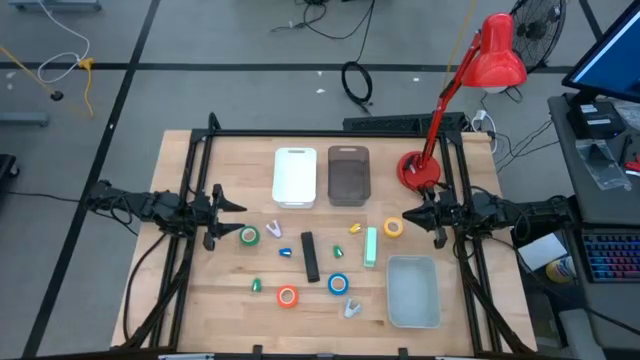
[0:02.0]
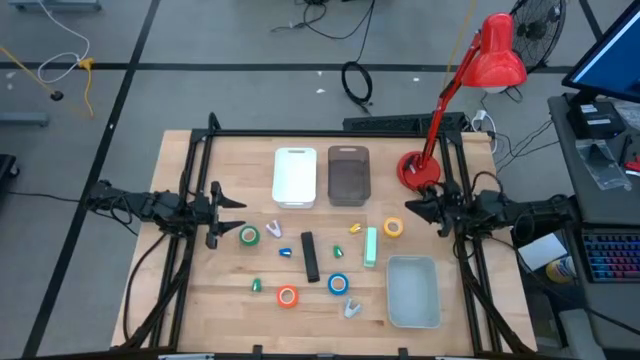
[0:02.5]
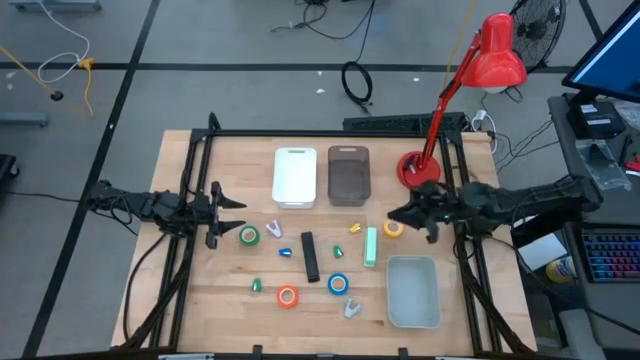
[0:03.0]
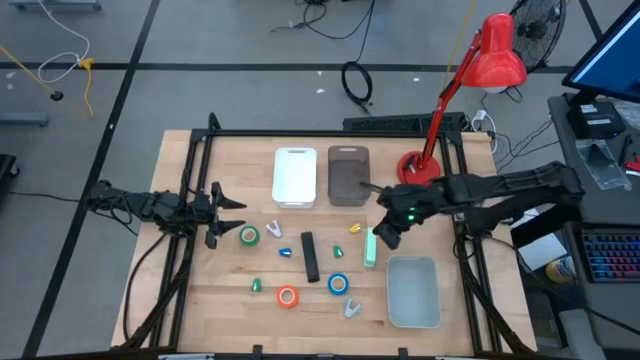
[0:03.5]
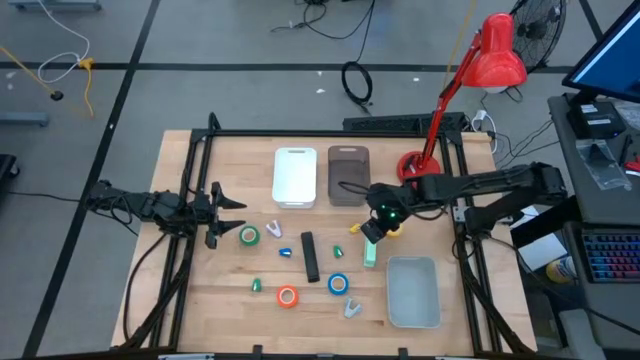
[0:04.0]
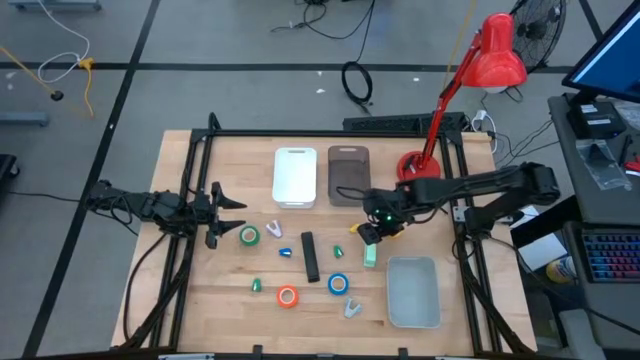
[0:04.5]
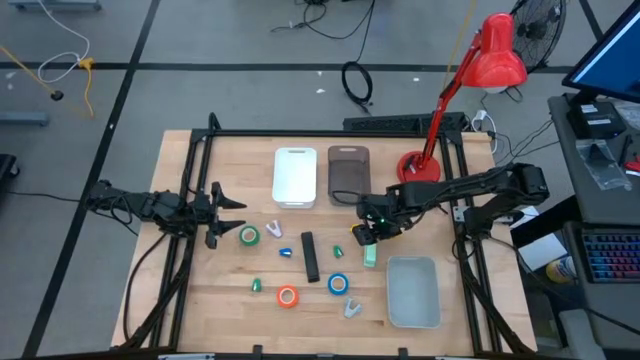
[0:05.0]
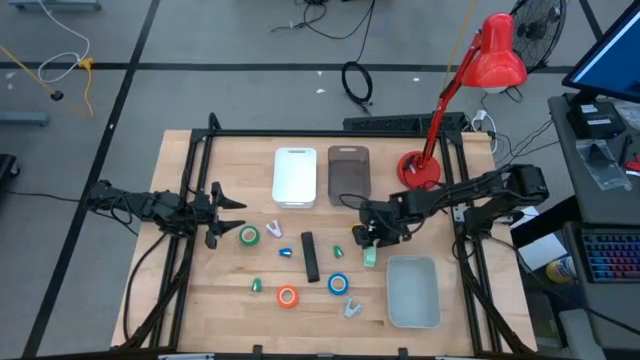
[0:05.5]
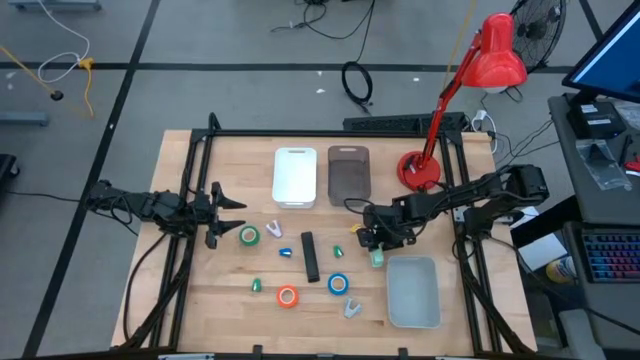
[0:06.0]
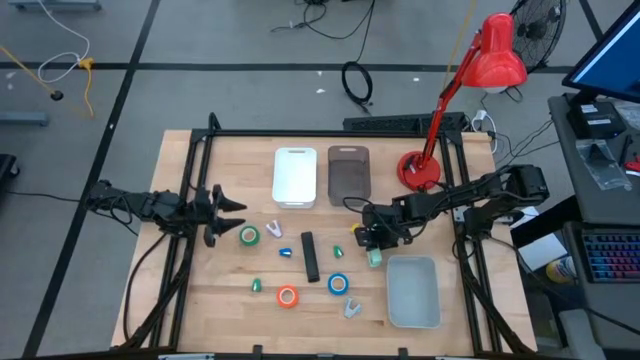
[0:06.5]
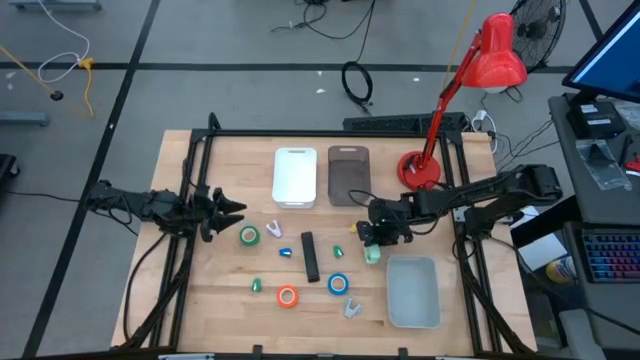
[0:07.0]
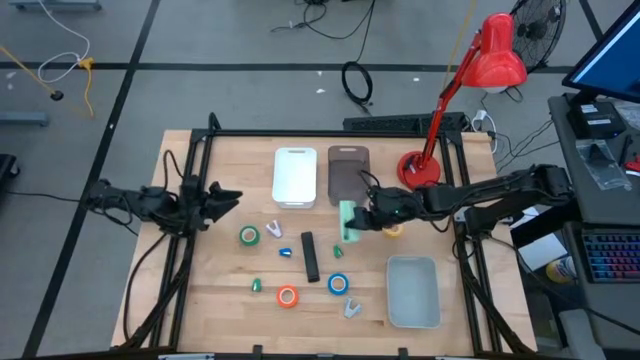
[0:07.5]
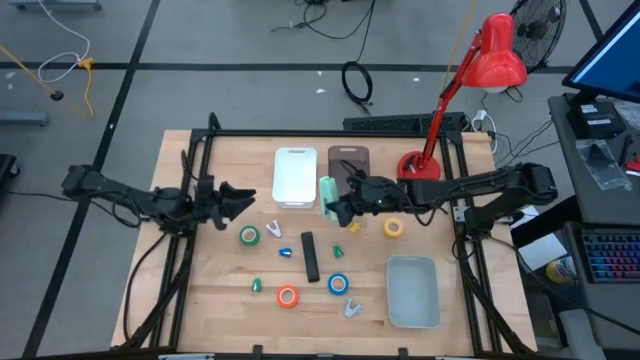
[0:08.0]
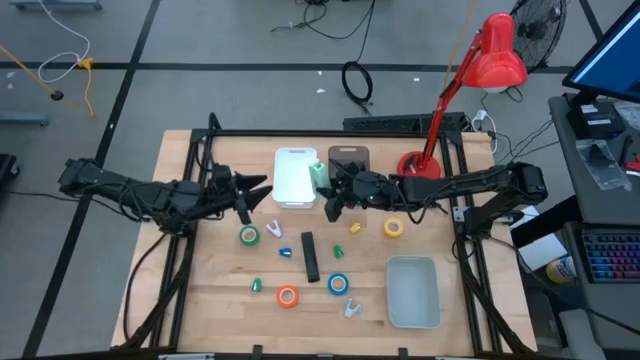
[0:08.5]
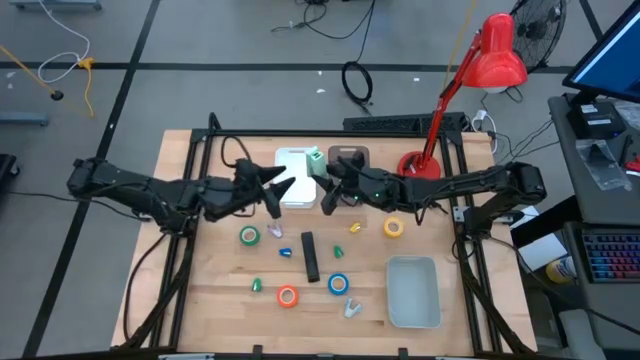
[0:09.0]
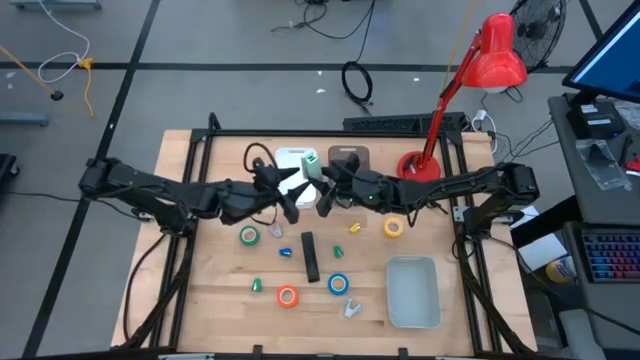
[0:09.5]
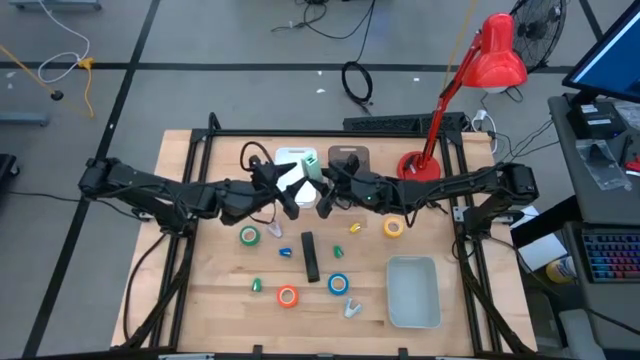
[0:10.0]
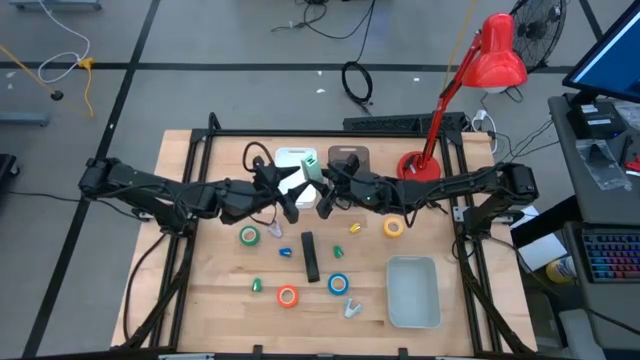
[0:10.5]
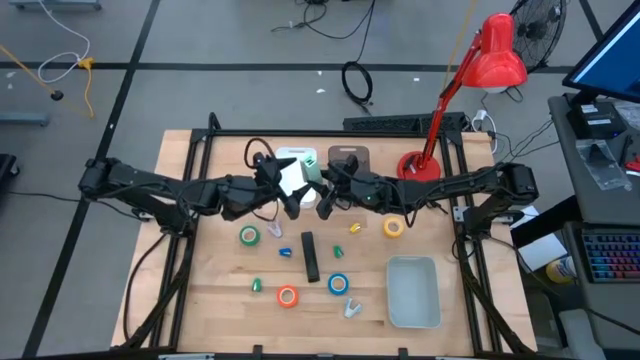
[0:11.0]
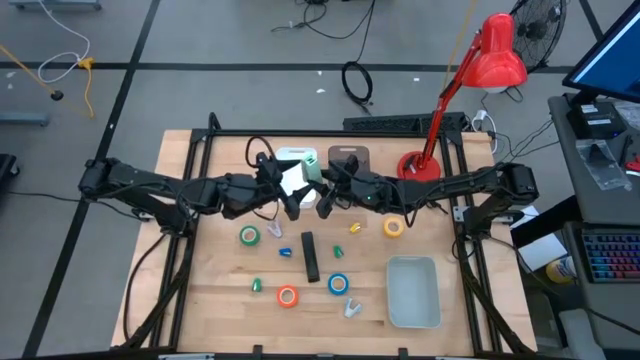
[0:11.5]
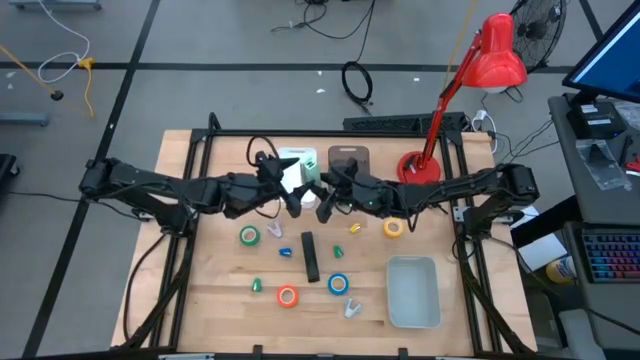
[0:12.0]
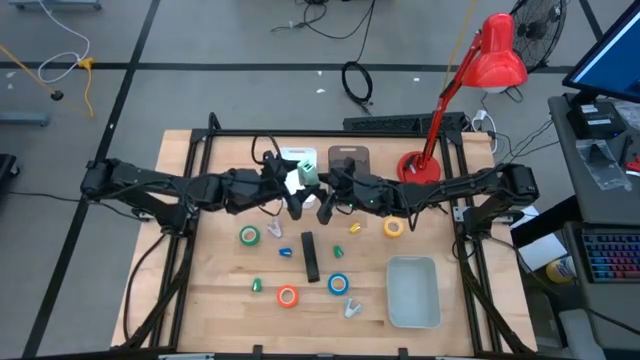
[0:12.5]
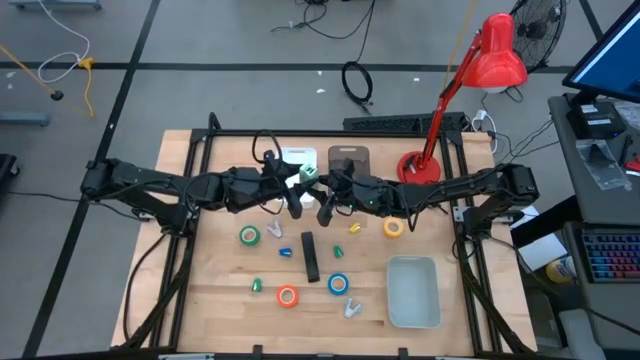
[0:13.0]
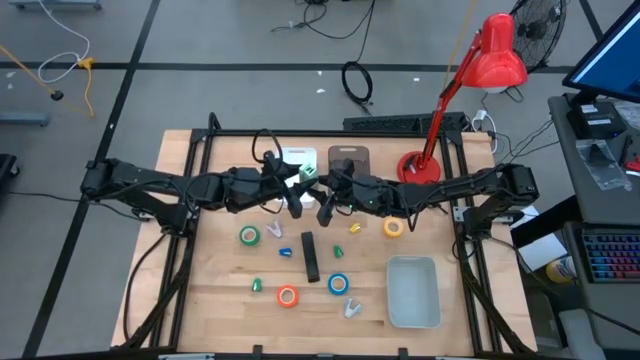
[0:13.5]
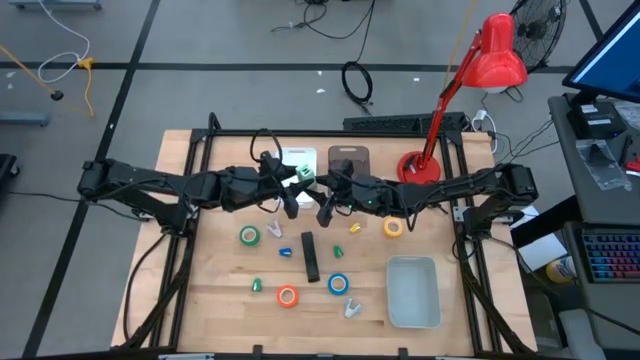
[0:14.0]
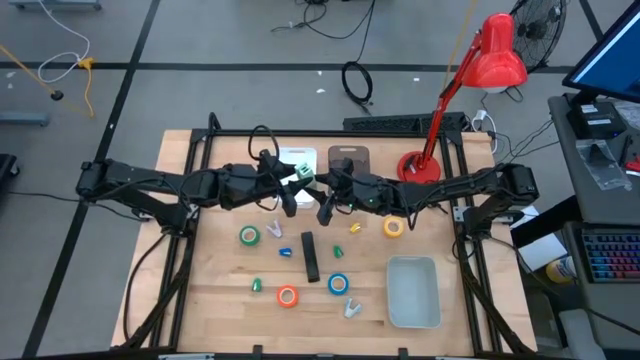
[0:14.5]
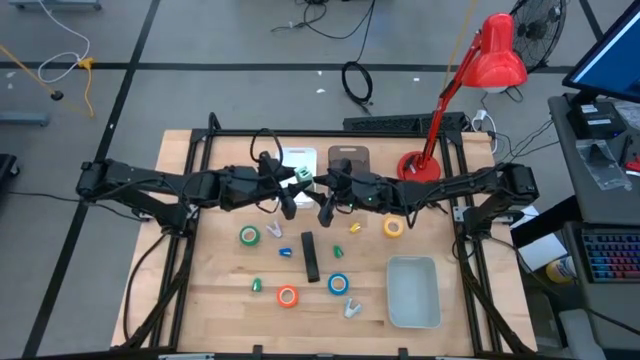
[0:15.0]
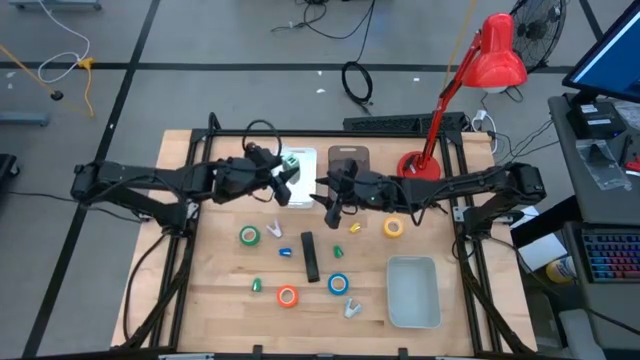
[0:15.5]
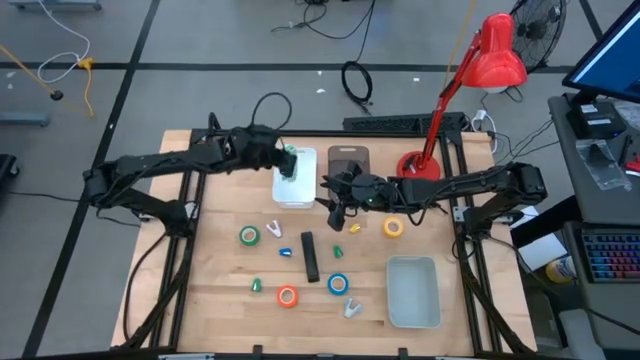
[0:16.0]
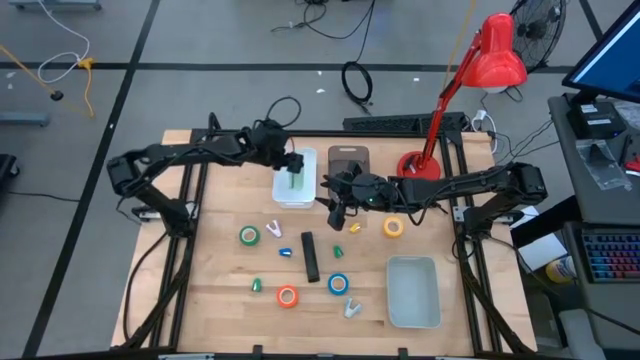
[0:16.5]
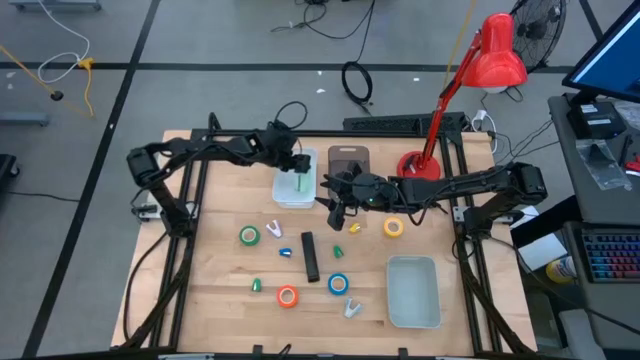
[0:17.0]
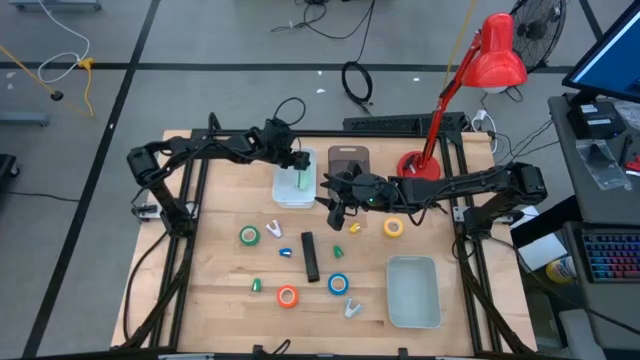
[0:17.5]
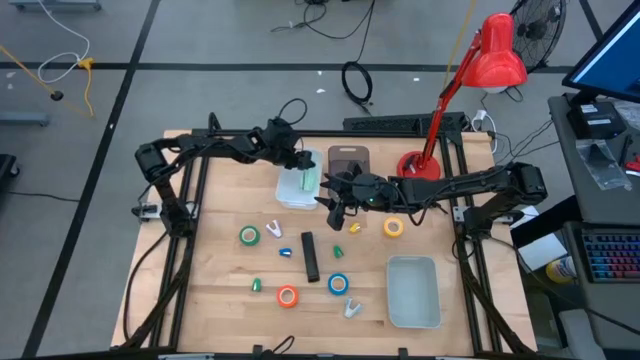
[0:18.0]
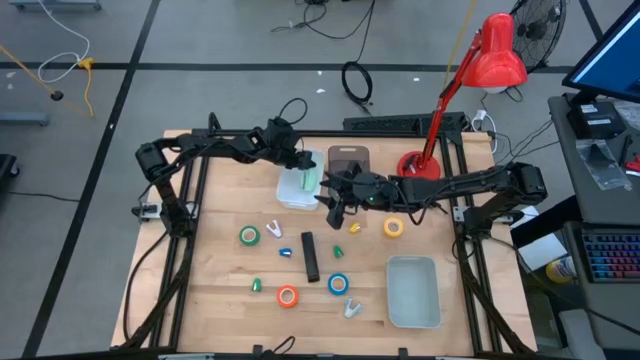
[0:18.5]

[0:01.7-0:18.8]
Task: Pick and place Stapler, Stapler remover, tape
Put the light blue stapler into the white bin
